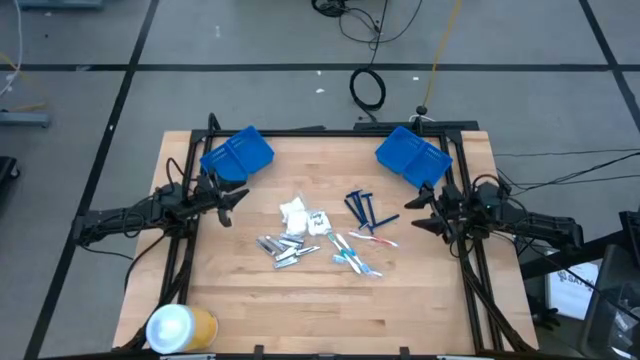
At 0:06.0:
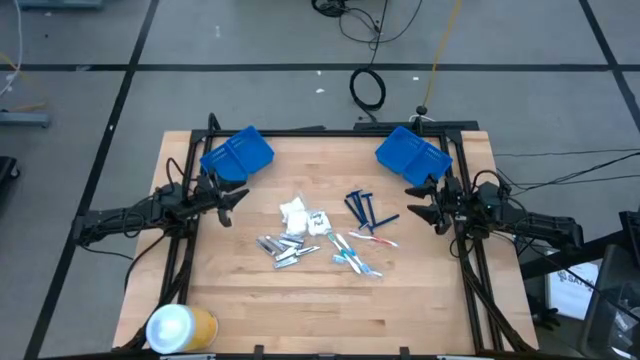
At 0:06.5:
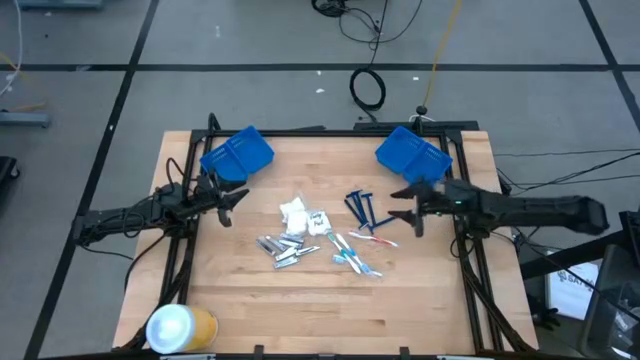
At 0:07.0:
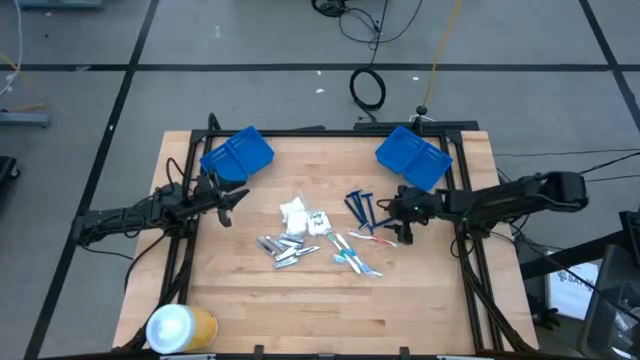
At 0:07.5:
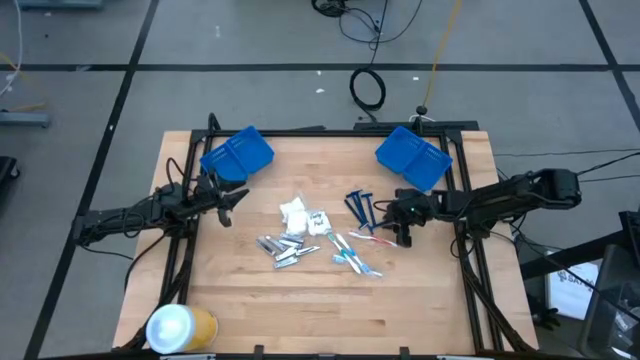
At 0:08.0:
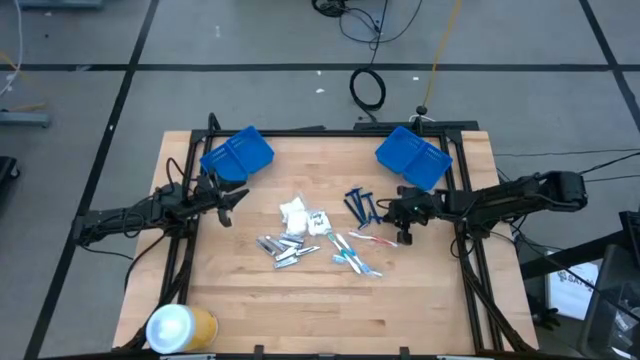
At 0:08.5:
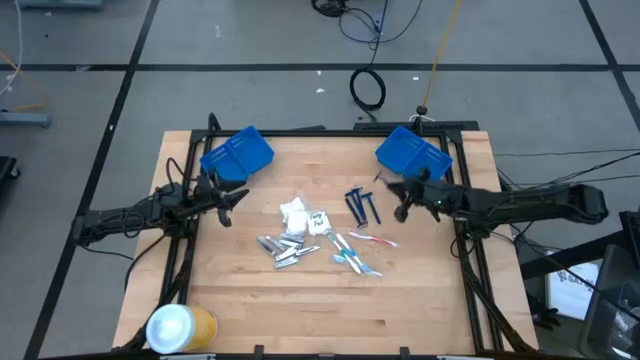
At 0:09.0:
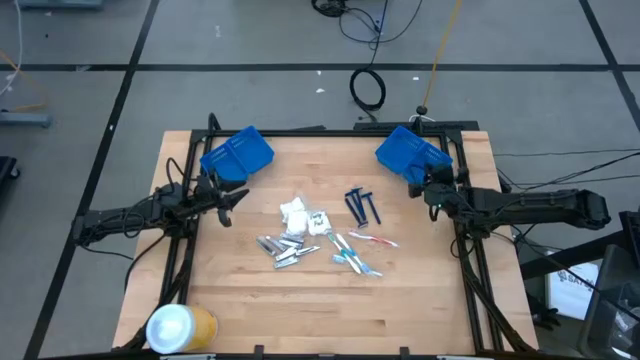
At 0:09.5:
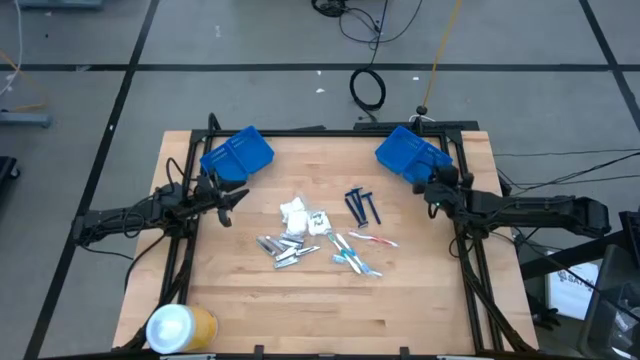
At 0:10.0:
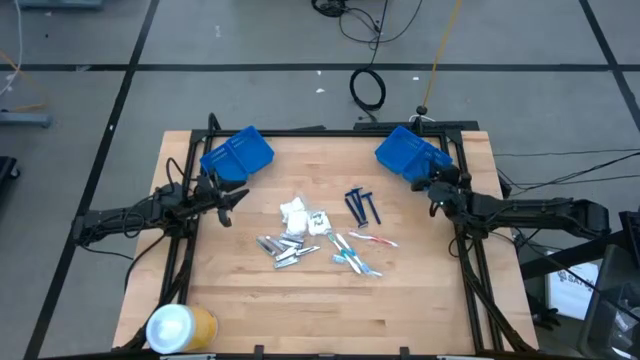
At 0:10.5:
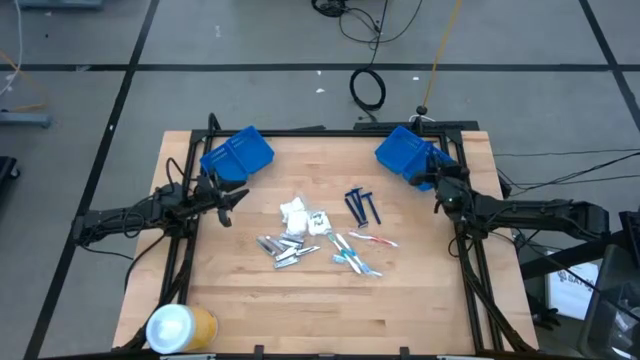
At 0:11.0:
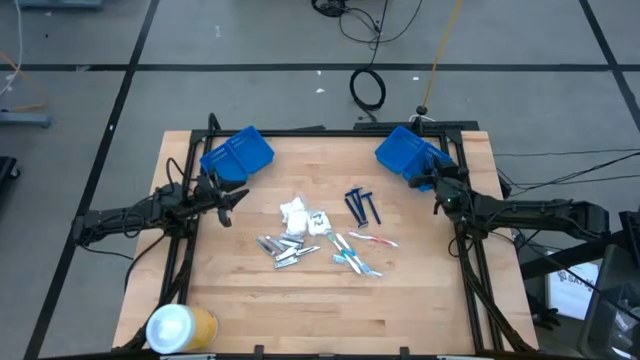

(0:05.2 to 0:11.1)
Task: Pick & Place Travel size toiletries
Put the blue razor into the right blue basket

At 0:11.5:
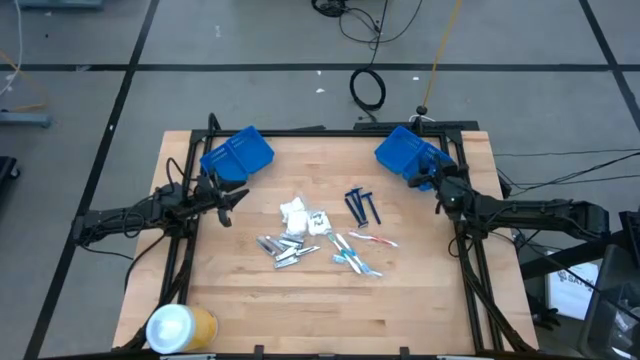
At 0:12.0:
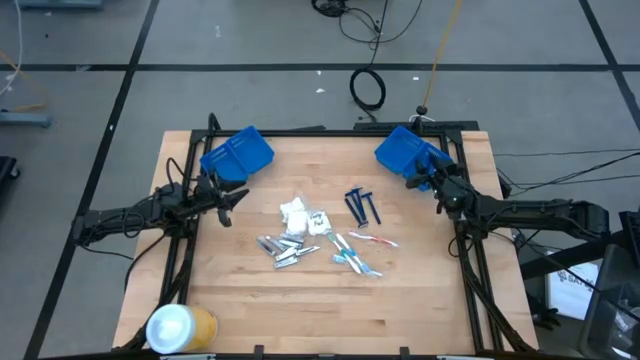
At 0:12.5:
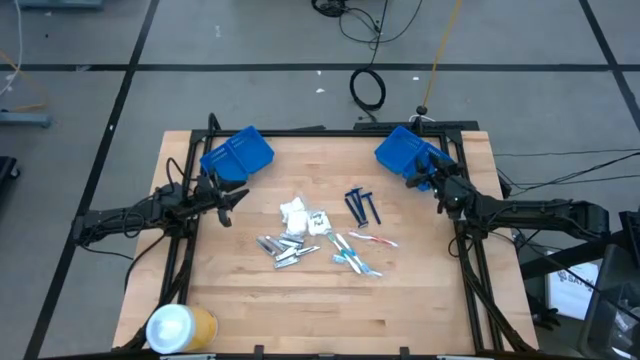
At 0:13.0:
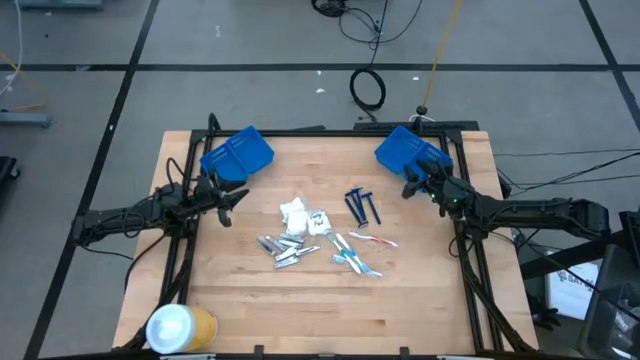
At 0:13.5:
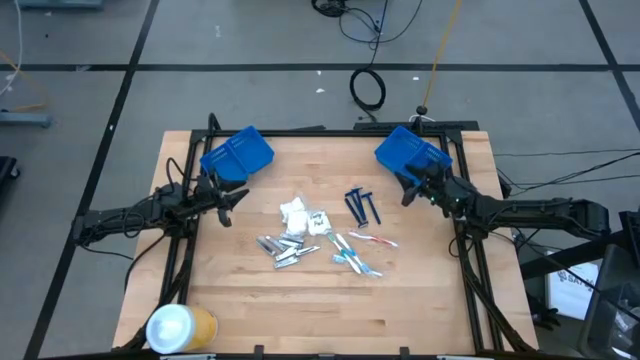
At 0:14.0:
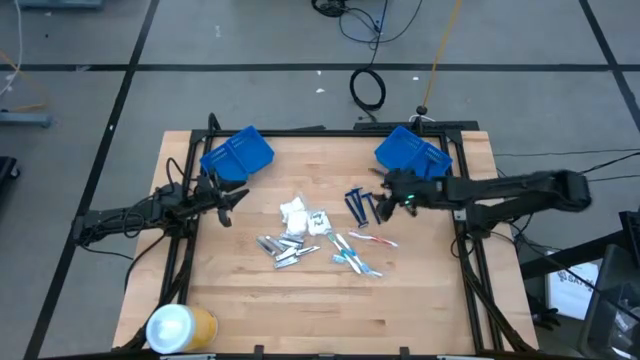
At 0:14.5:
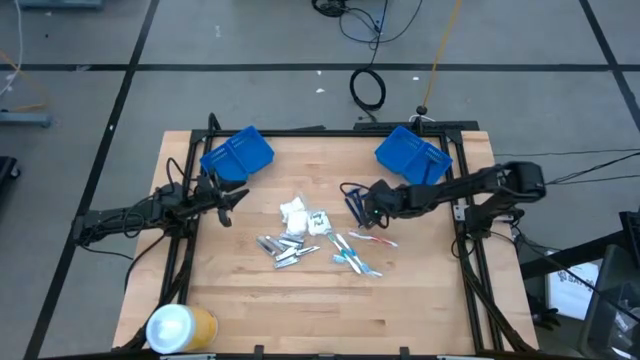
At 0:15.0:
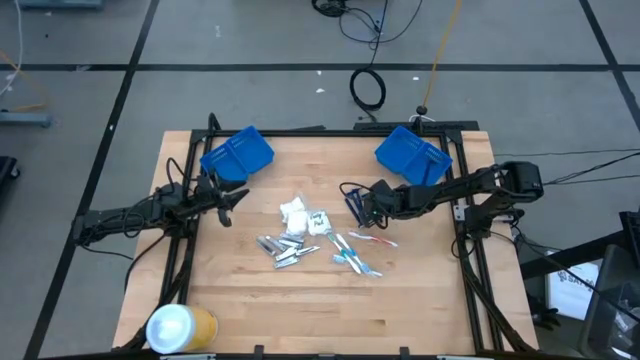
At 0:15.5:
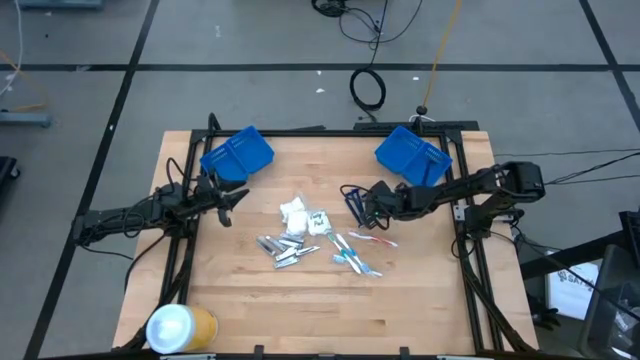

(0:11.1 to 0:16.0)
Put the blue razor into the right blue basket

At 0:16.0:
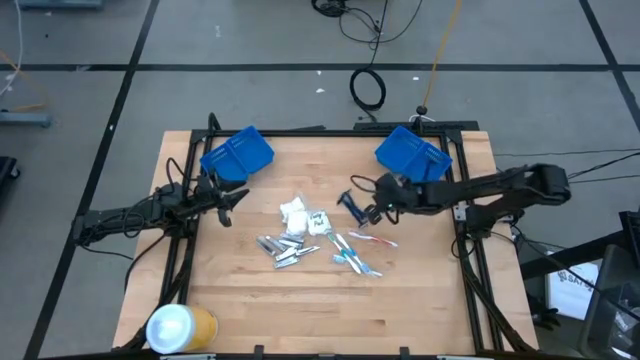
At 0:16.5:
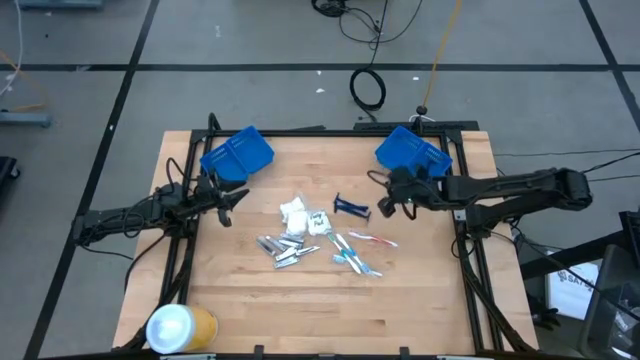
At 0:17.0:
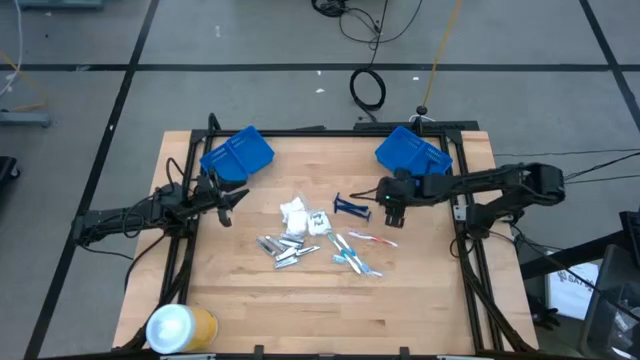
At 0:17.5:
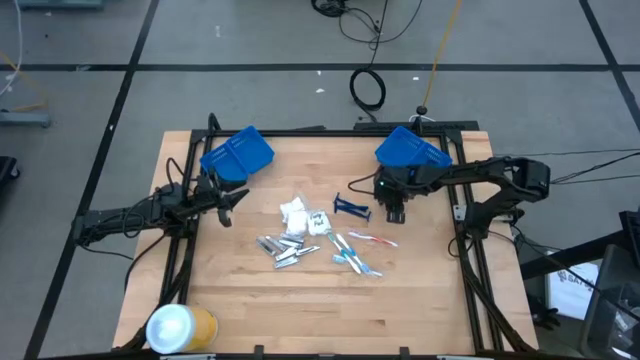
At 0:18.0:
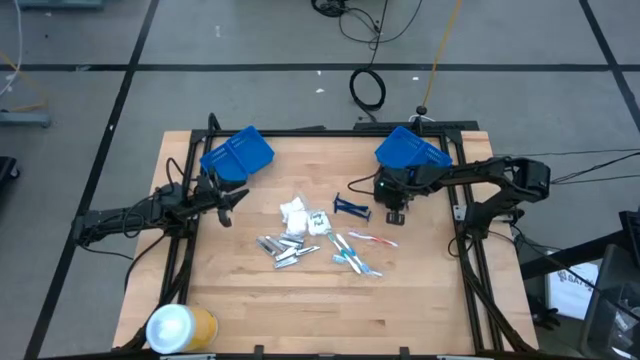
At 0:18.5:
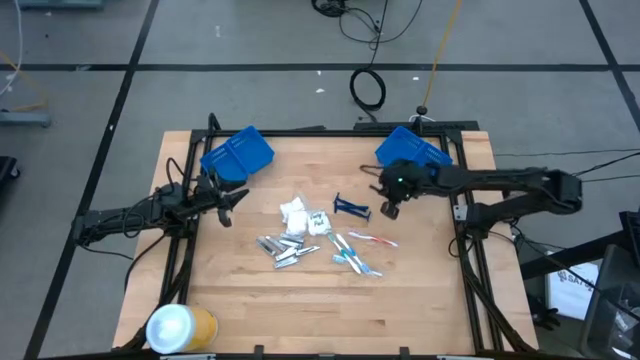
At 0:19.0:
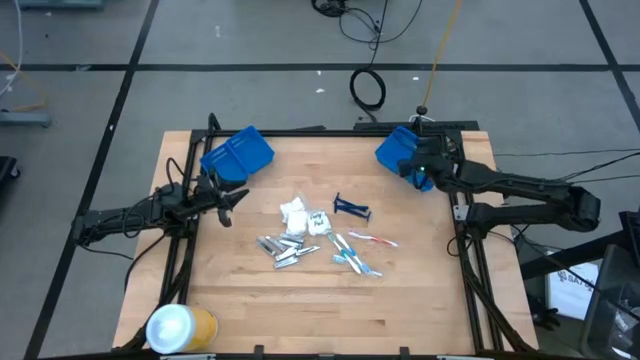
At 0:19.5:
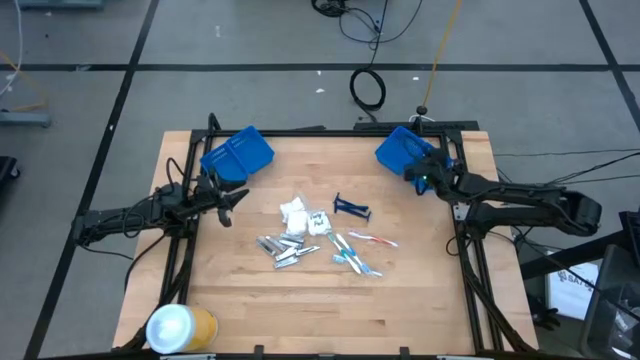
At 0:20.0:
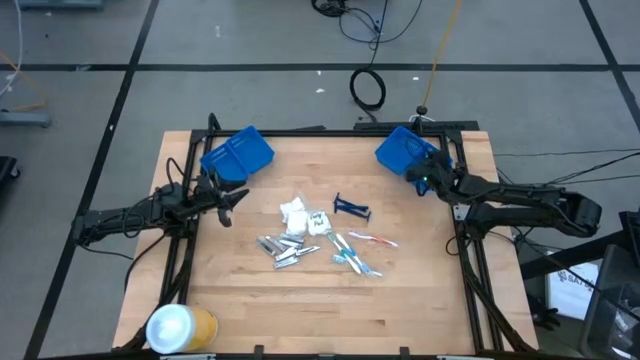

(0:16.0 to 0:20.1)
Put the blue razor into the right blue basket

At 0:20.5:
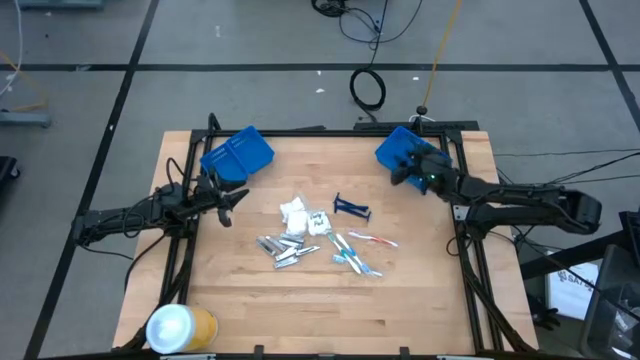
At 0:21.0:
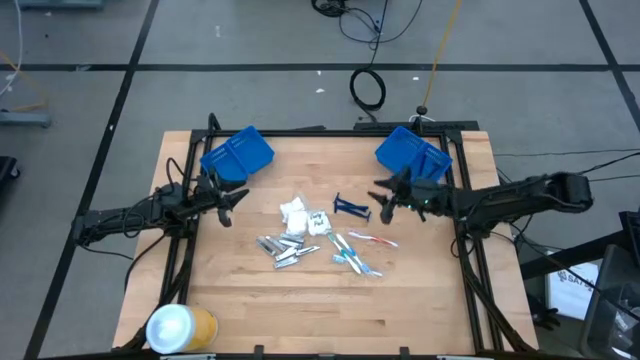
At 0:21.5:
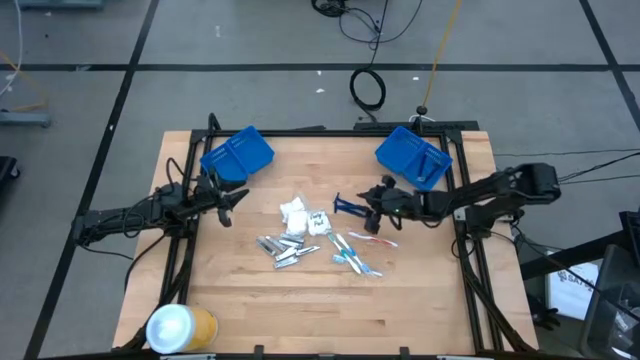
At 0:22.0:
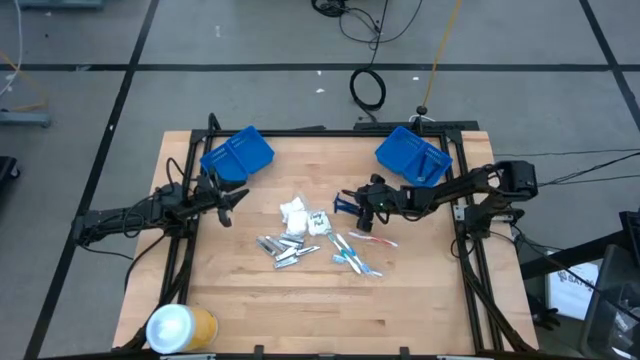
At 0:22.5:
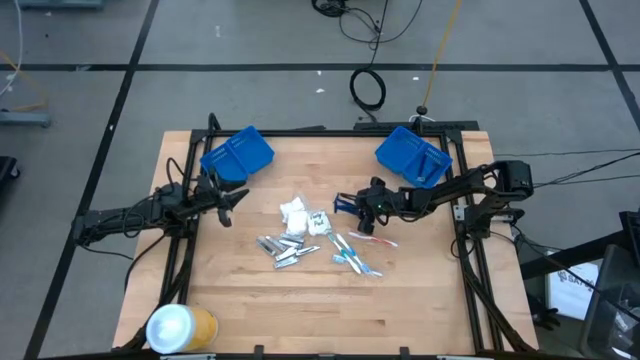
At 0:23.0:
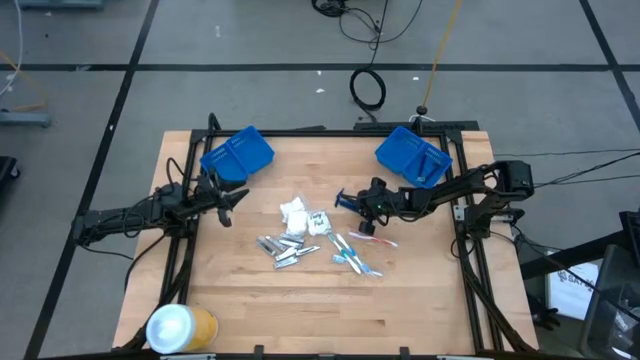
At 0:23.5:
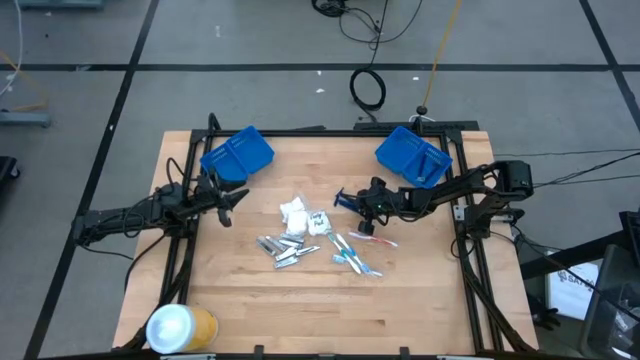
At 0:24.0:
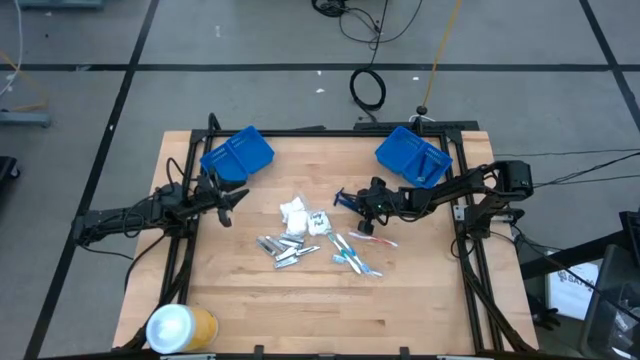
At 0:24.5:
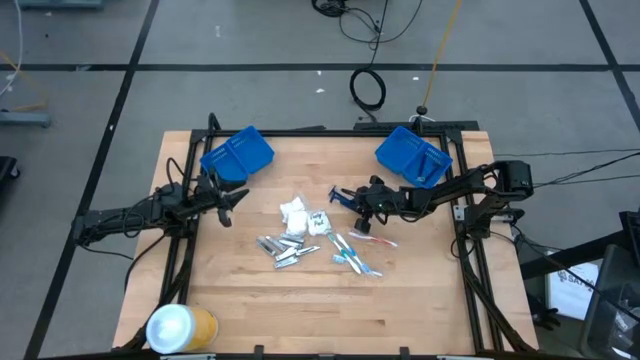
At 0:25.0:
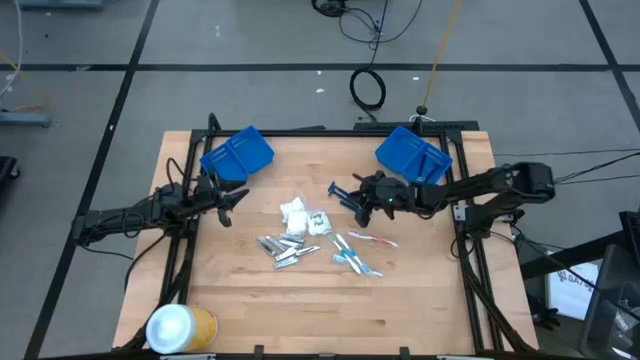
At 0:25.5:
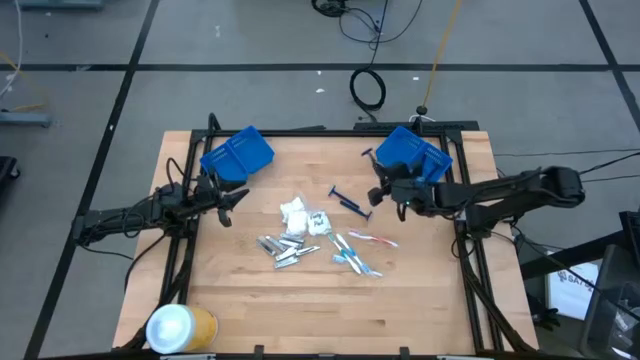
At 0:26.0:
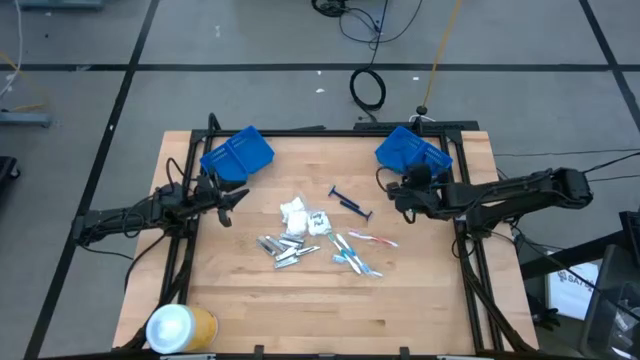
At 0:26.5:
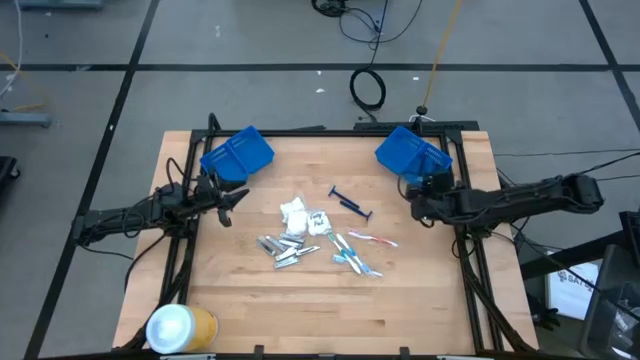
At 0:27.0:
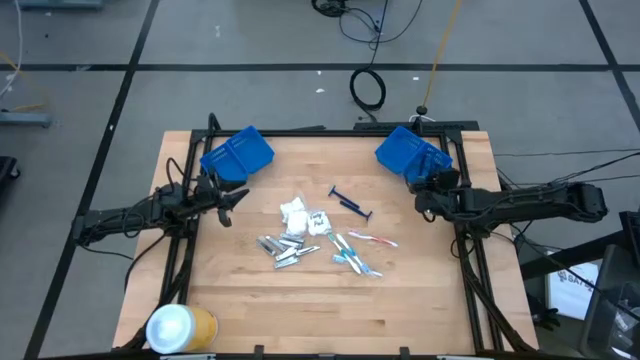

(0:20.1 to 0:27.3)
Put the blue razor into the right blue basket
